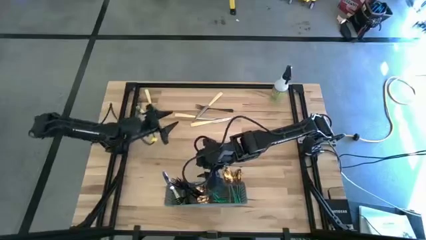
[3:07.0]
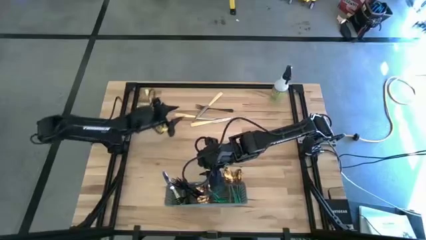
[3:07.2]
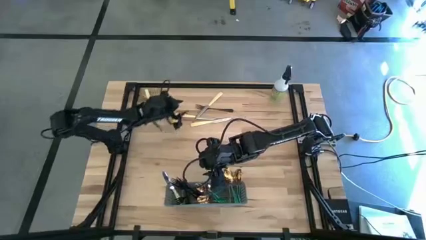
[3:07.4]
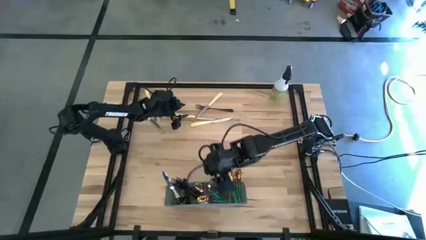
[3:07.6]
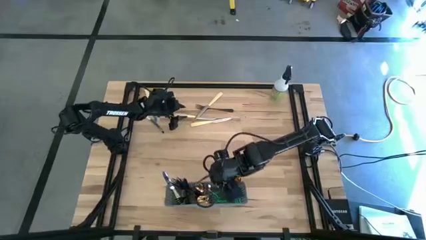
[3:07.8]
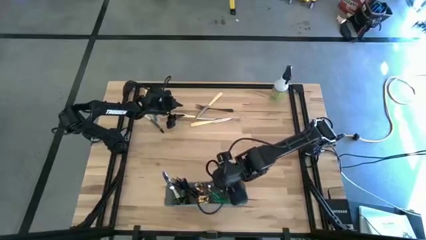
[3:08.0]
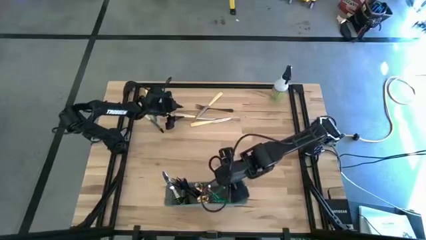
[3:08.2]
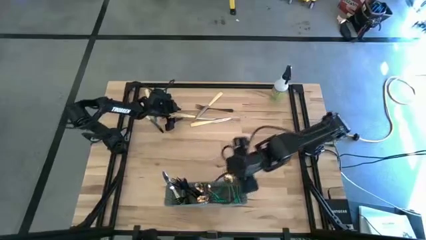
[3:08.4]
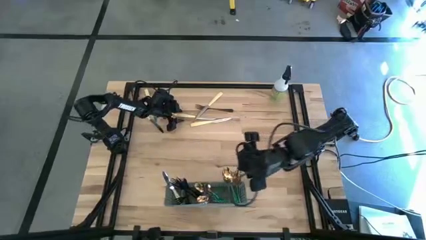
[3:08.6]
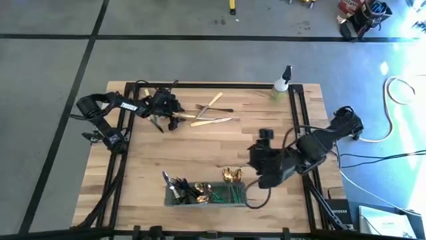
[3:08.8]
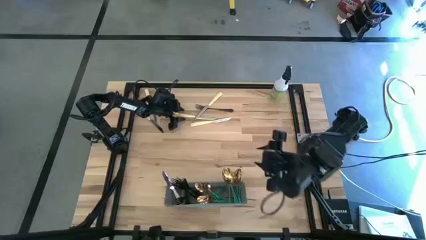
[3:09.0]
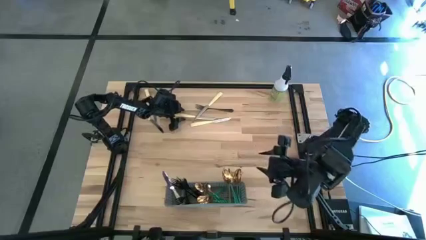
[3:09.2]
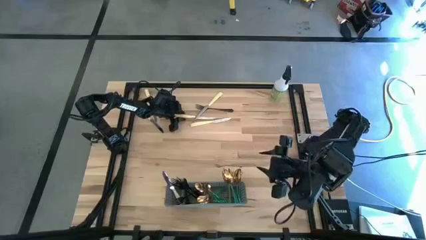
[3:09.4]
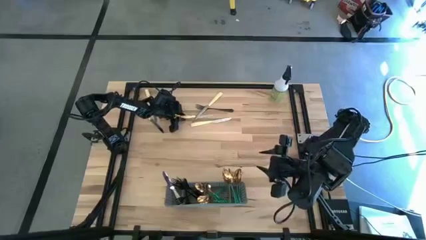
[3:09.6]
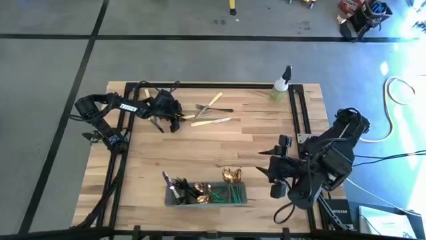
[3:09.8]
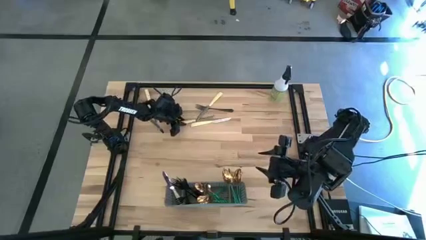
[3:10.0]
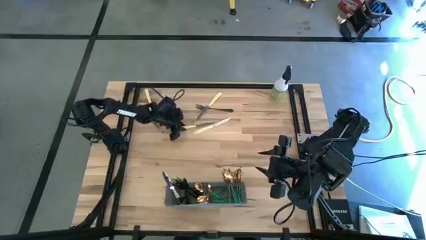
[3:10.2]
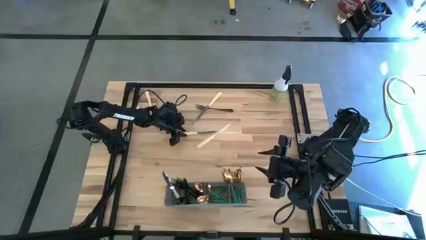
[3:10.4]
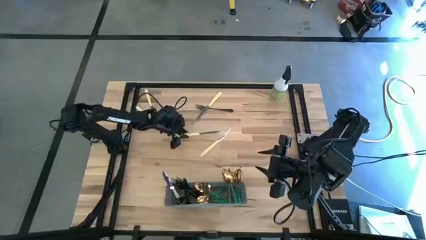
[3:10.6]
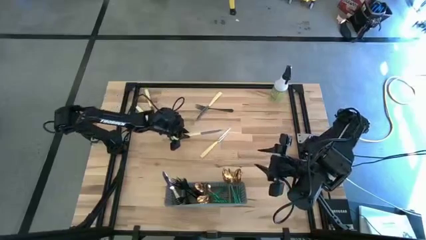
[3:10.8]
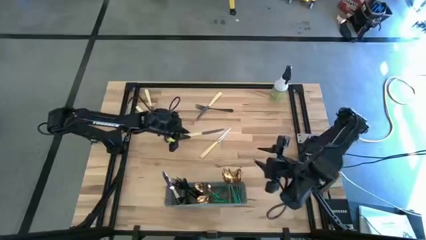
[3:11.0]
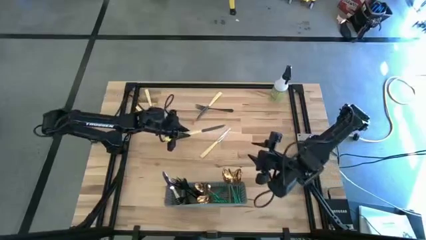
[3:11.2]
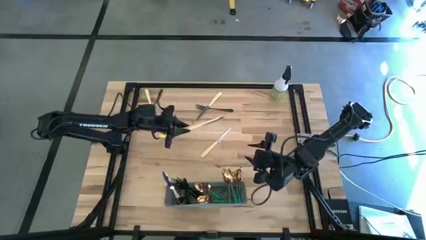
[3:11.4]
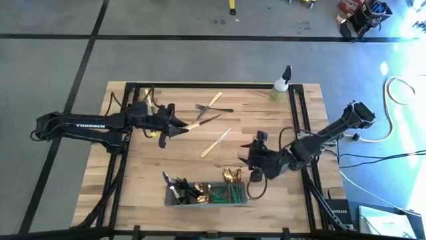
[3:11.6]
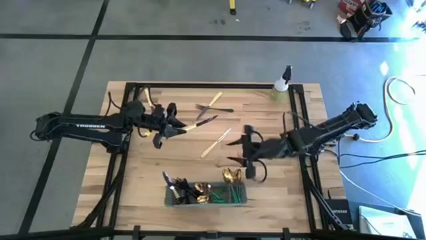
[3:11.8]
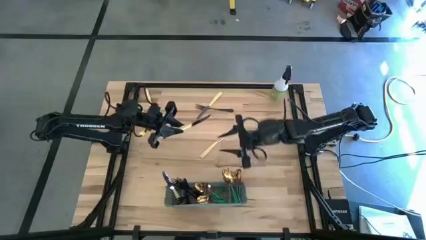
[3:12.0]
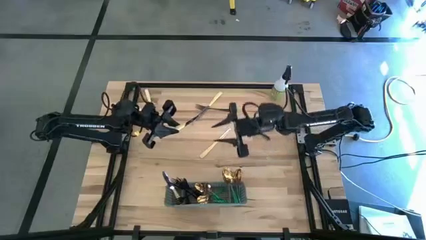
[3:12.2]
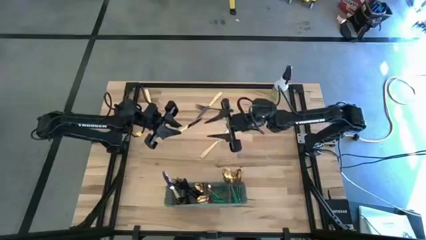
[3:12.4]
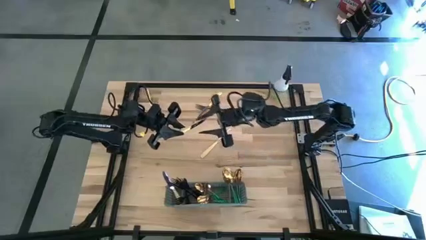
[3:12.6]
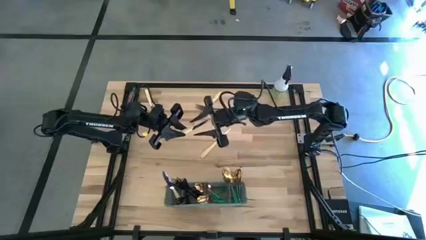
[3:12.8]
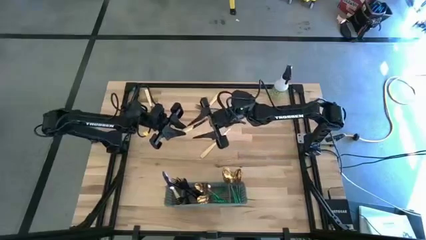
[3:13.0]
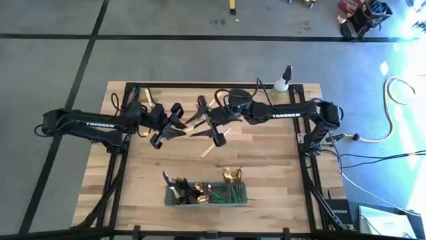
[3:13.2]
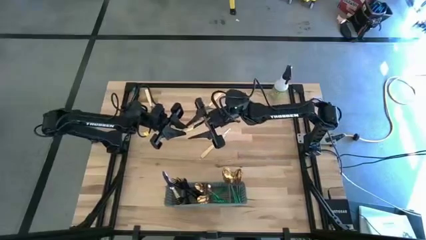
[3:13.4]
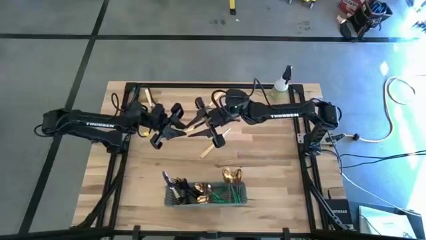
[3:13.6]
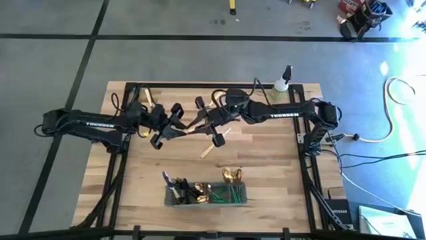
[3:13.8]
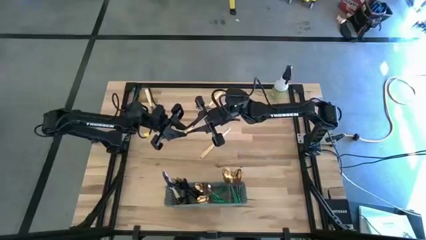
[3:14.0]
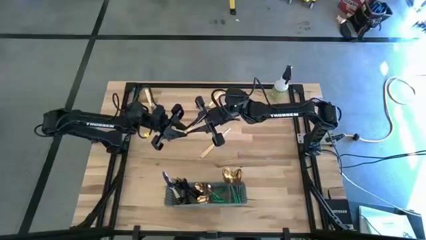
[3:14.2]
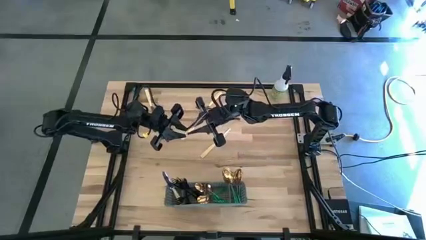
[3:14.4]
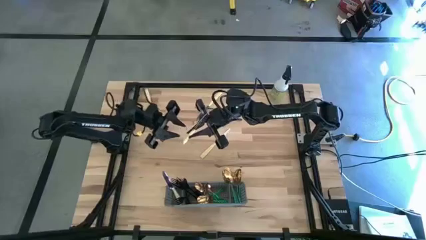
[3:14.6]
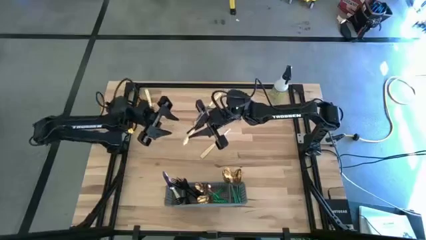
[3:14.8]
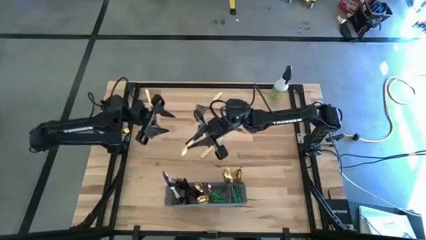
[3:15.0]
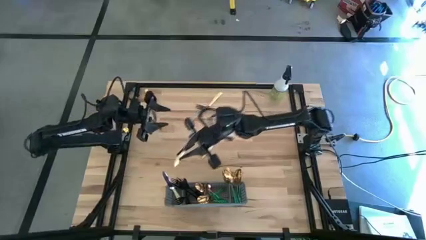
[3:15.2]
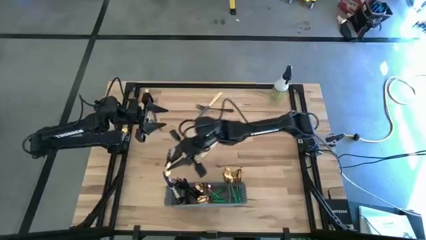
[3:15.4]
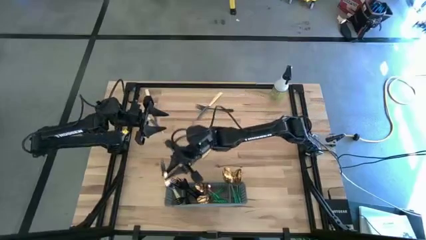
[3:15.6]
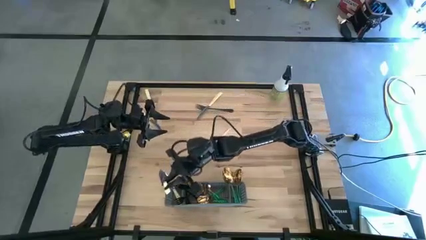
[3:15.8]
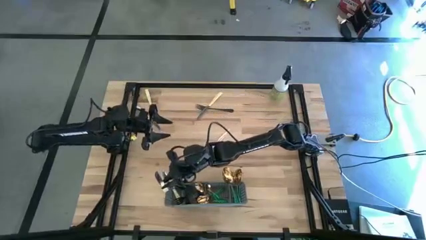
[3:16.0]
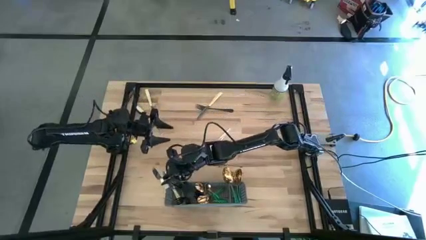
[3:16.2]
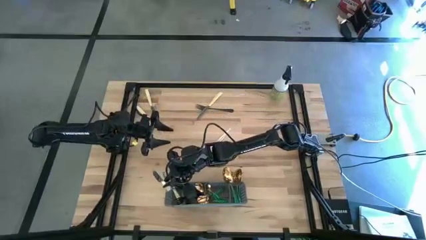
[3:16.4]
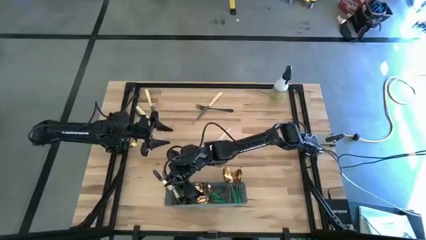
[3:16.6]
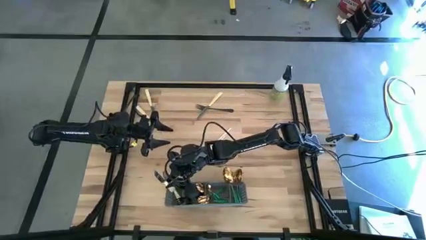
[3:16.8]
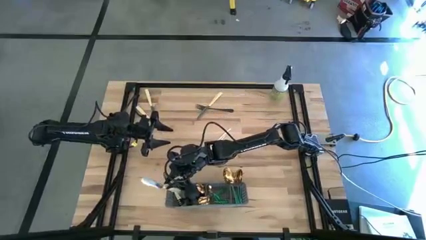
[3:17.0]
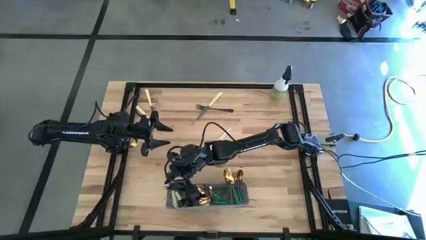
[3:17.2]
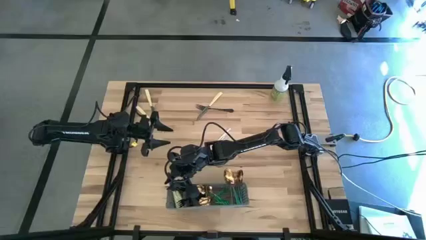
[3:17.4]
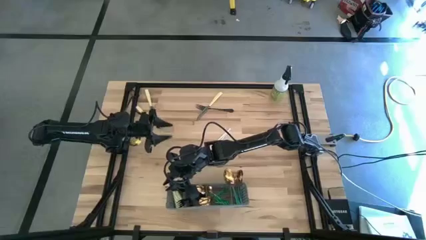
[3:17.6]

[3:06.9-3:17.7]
Task: Sort silverware
Put the middle yellow knife into the gray cutlery rack

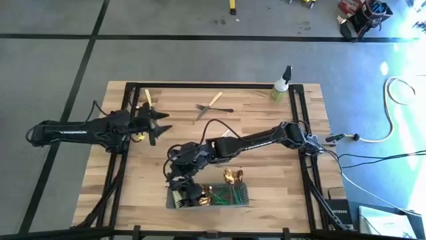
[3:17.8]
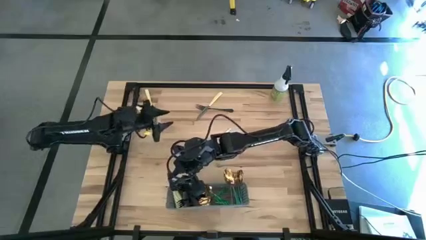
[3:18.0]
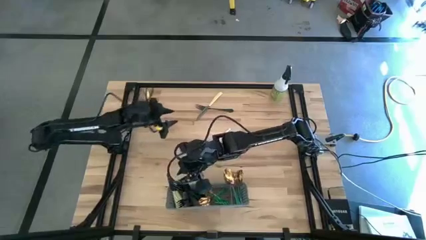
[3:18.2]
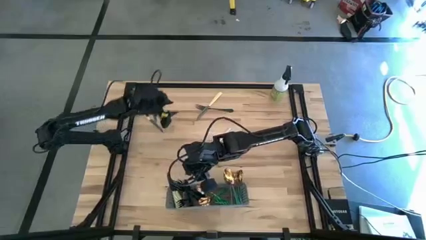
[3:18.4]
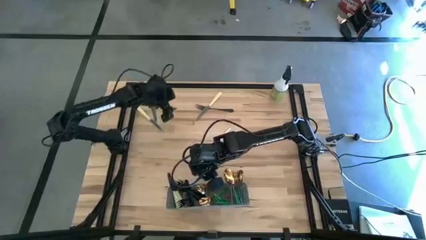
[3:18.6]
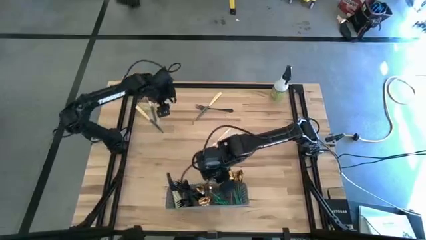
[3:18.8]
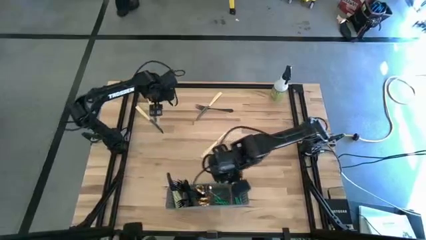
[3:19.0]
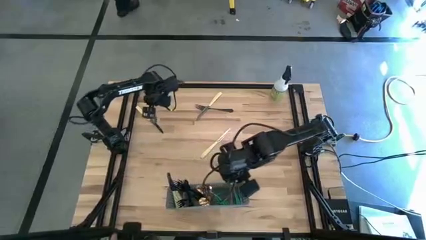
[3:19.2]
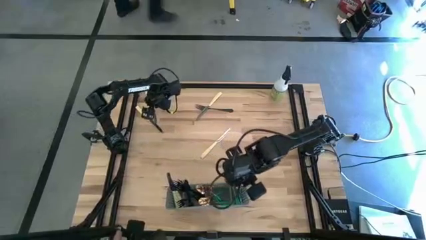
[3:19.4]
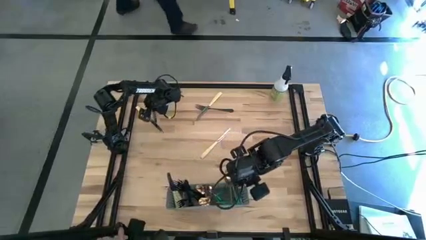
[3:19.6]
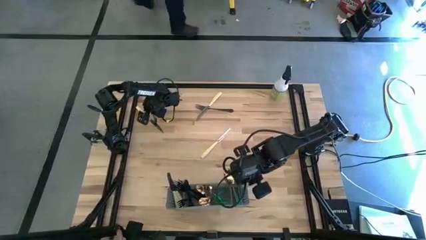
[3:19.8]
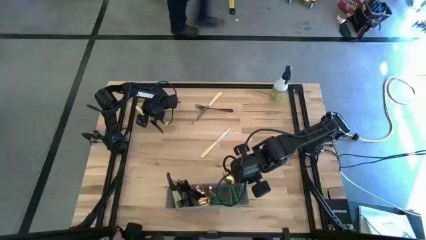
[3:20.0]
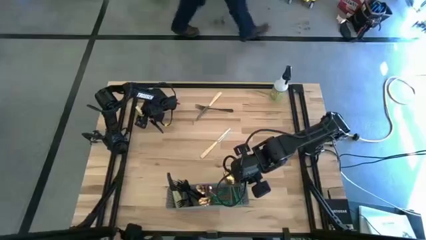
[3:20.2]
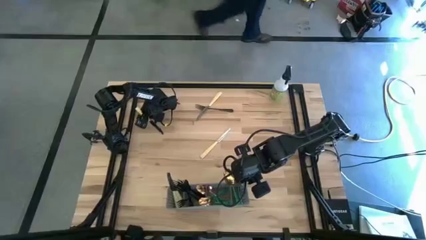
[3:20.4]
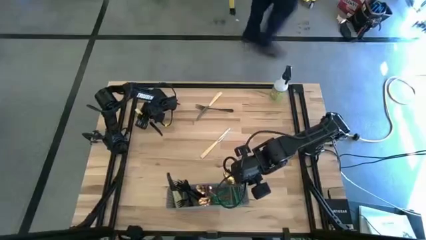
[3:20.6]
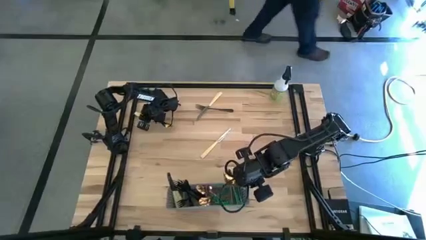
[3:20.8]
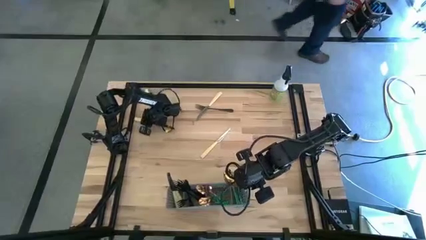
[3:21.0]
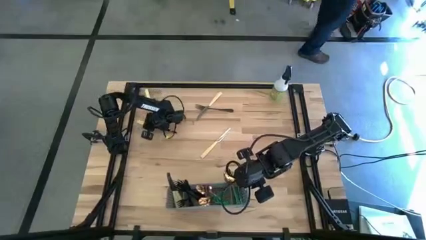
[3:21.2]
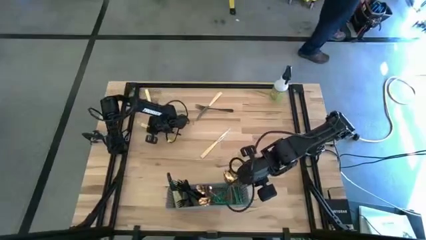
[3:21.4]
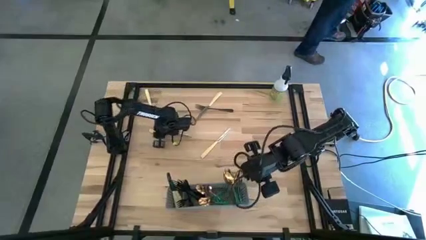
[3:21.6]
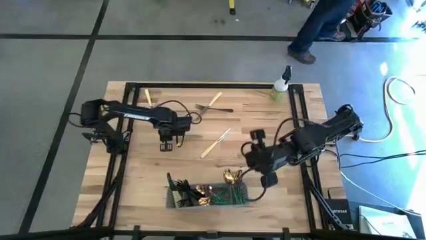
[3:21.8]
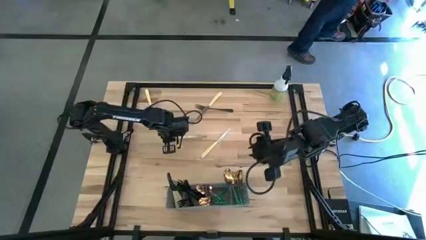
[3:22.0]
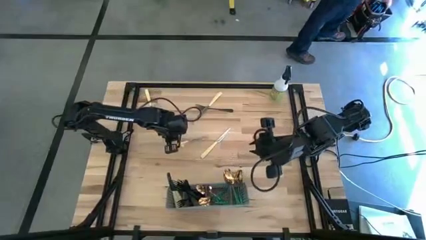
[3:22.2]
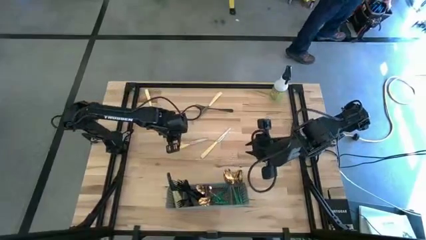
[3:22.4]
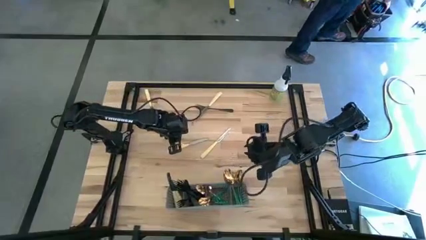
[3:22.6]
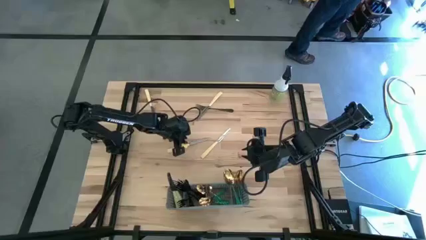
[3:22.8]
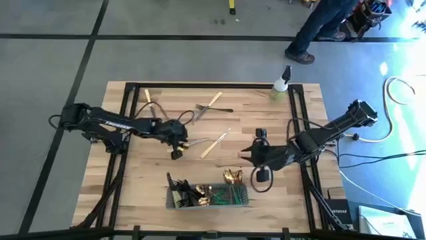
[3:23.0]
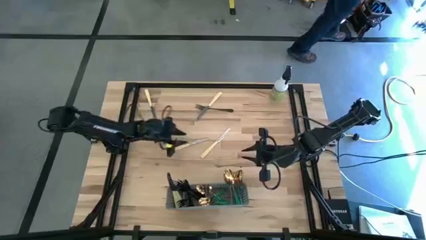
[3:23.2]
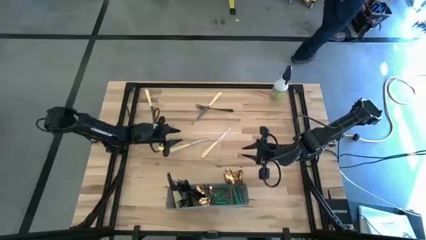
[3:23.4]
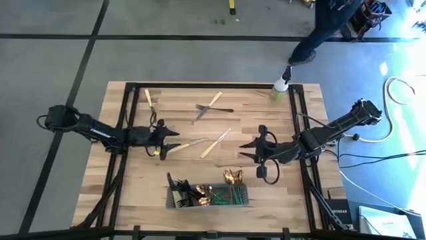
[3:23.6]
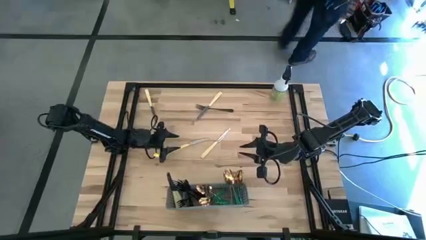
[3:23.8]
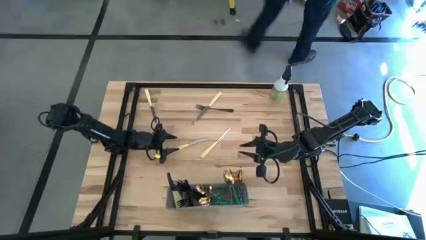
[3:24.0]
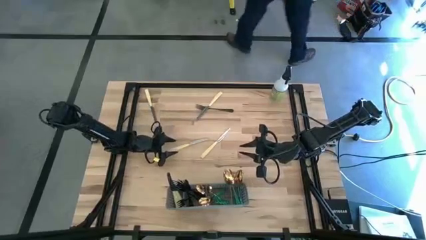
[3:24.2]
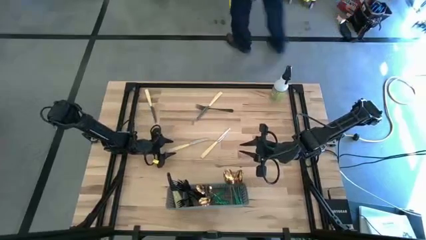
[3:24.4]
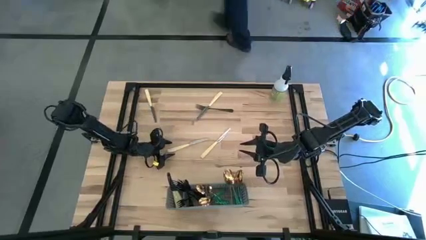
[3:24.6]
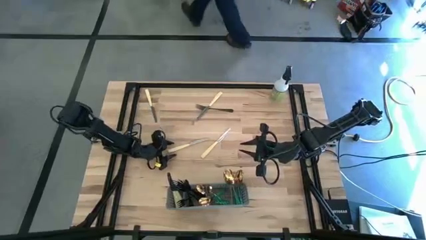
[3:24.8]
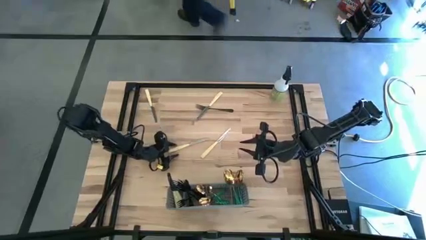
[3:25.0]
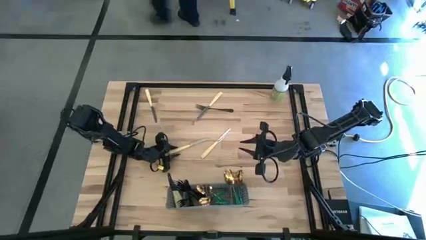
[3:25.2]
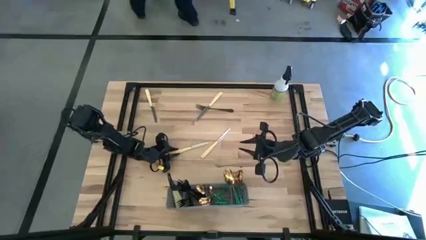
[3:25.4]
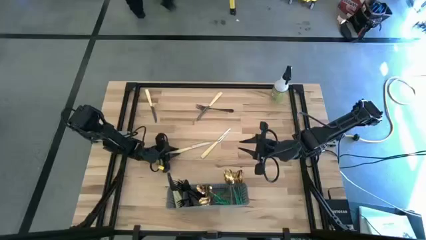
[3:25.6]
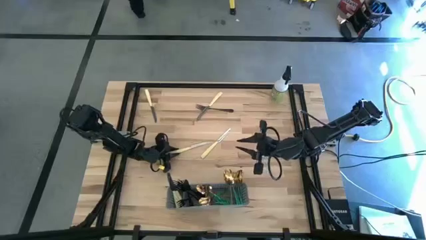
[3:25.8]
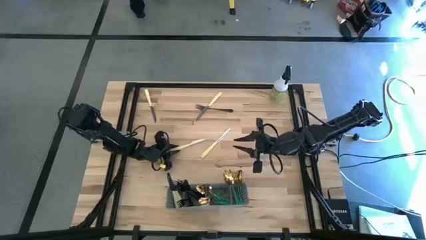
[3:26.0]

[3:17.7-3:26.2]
Put the left bottom yellow knife into the gray cutlery rack
